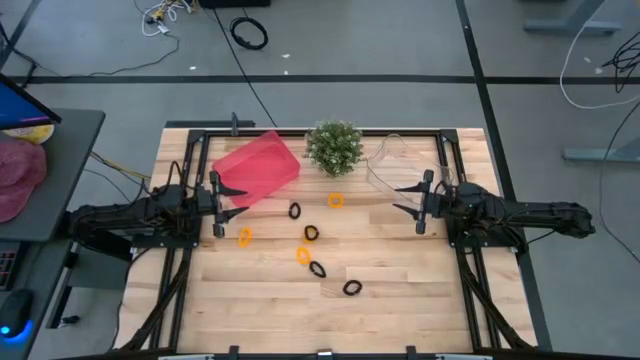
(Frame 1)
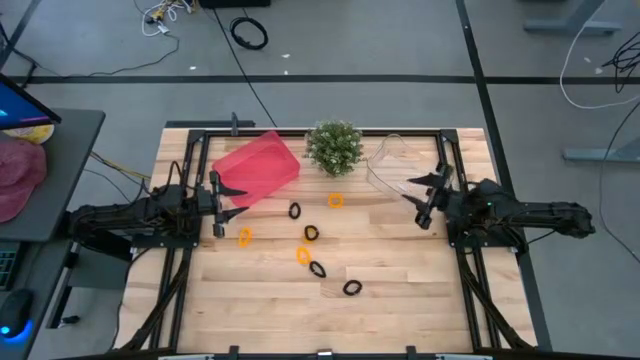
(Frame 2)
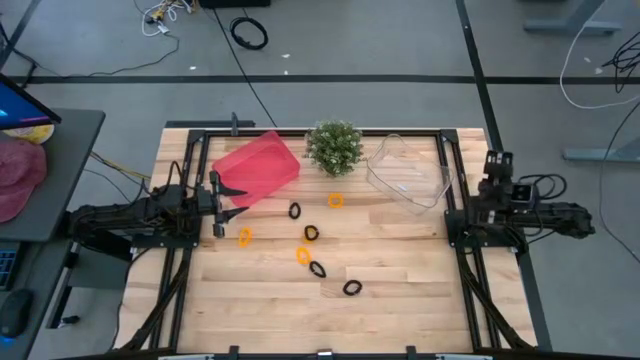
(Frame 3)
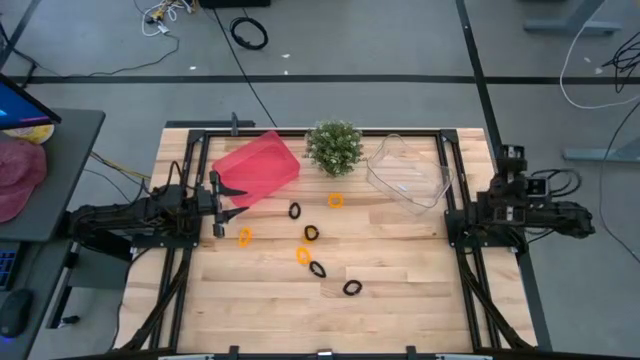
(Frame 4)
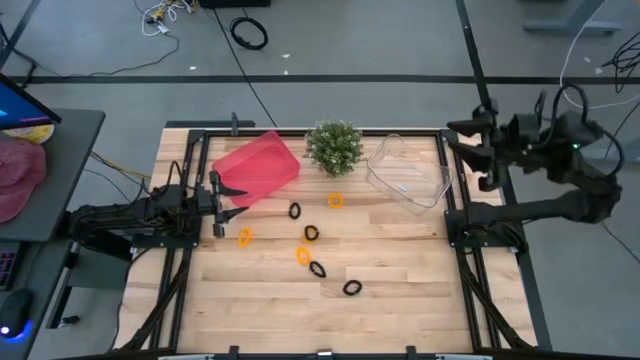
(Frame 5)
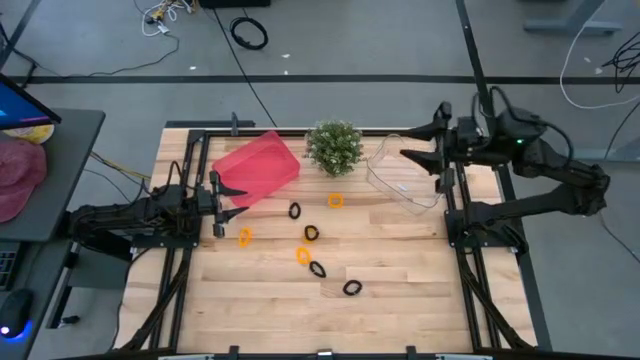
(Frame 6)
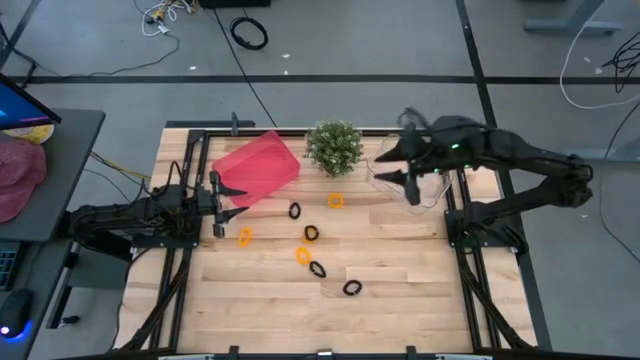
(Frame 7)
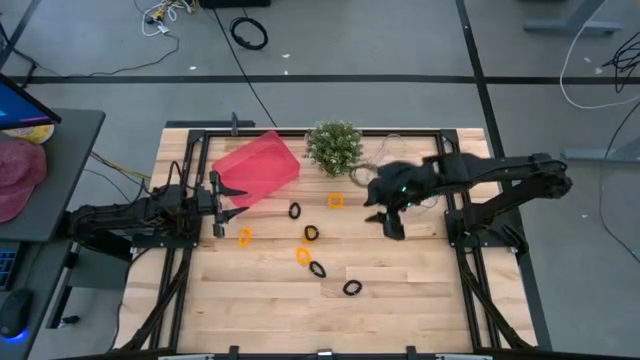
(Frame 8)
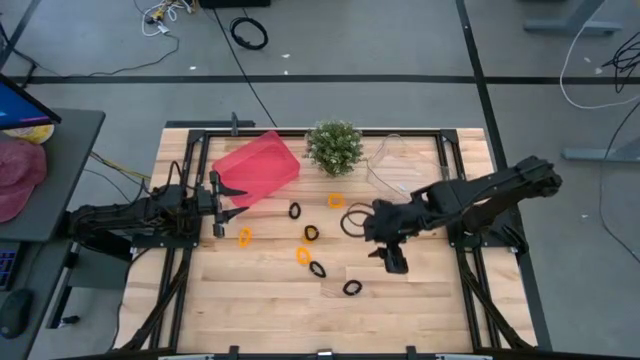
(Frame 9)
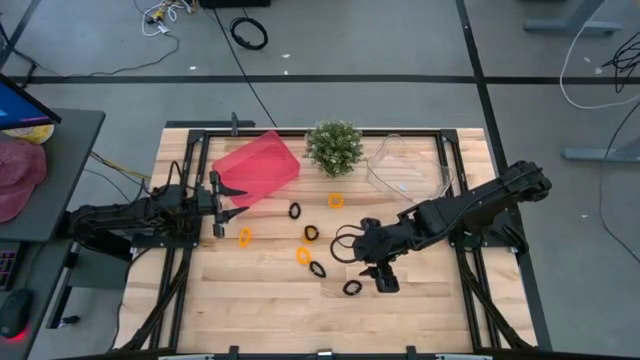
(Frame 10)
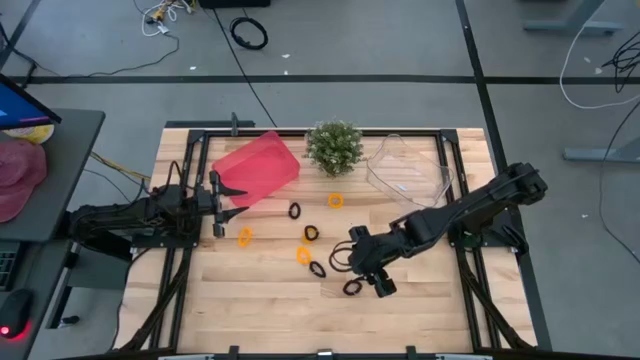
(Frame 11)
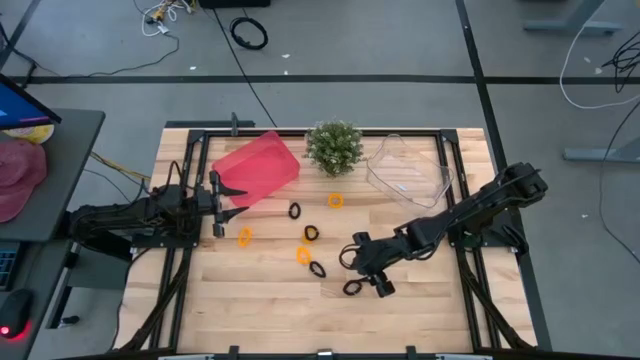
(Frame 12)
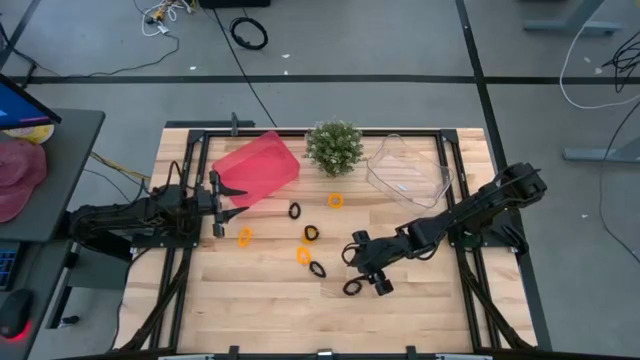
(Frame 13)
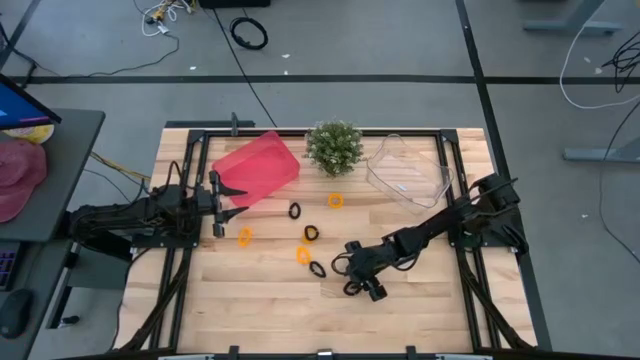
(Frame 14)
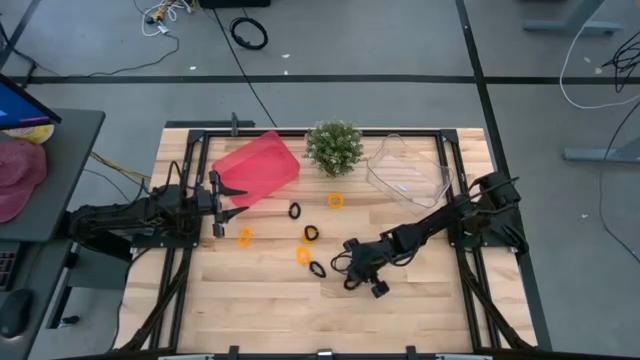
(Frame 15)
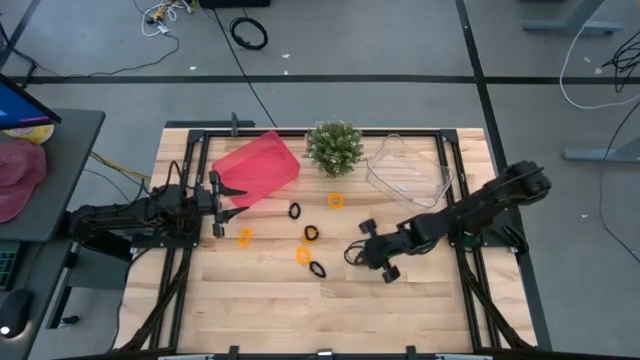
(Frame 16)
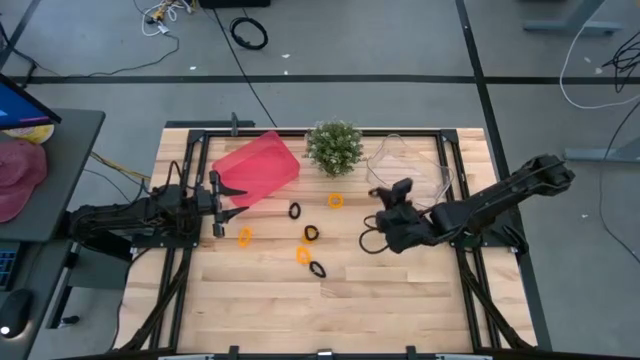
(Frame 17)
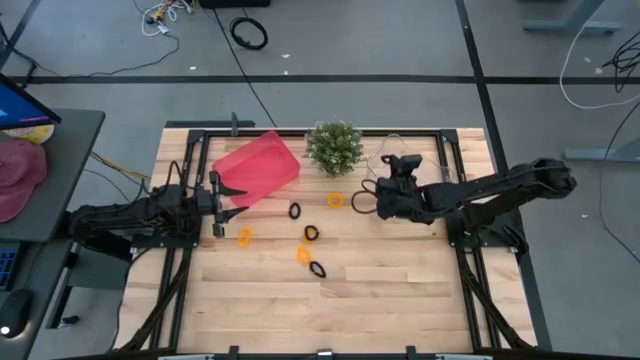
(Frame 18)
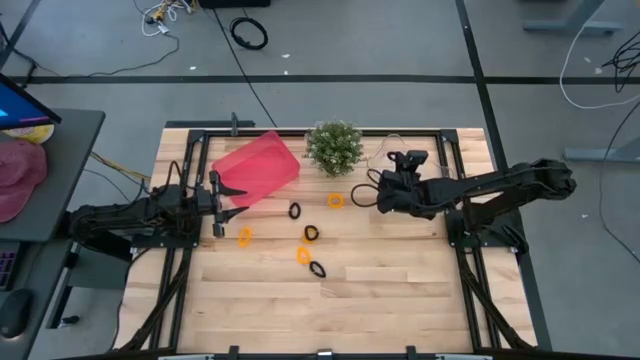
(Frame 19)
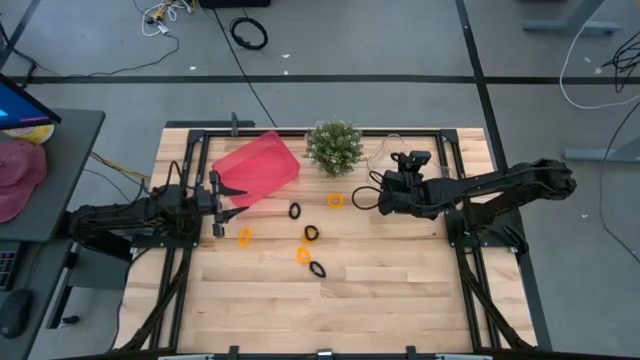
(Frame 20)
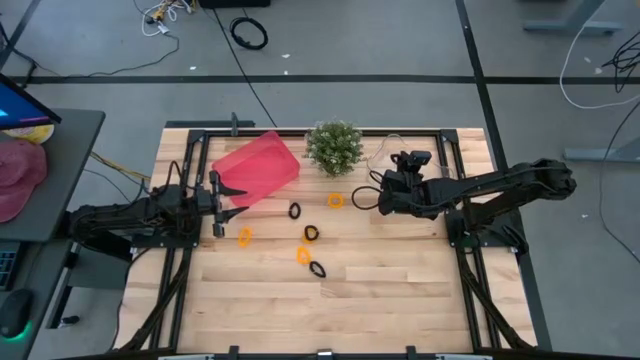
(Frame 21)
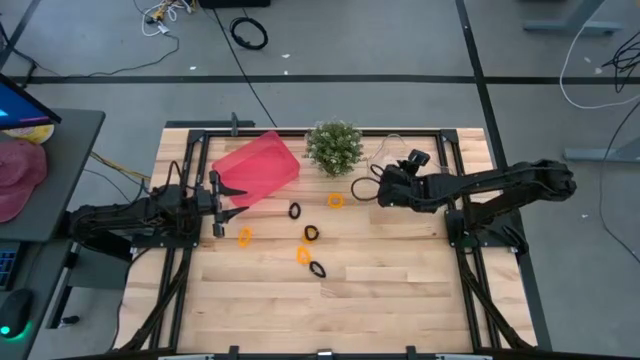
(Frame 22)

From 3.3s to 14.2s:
Task: Sort spring keychains
Put the black spring keychain into the transparent bin

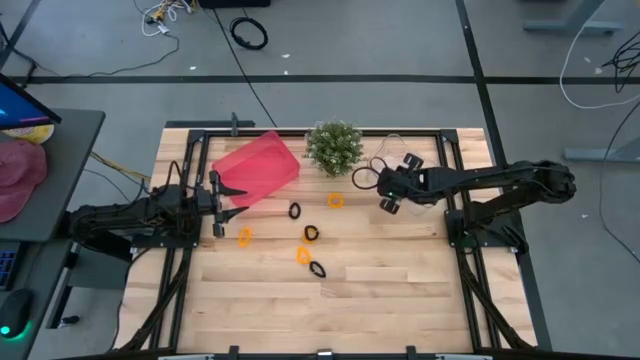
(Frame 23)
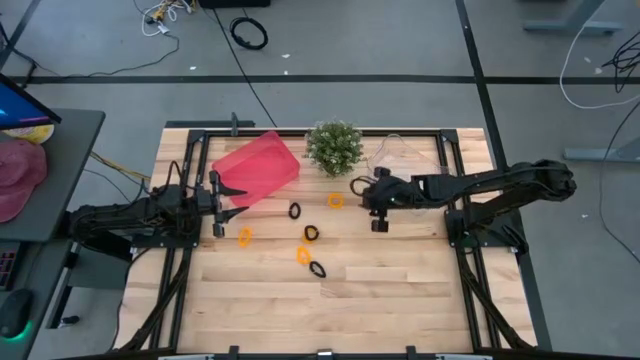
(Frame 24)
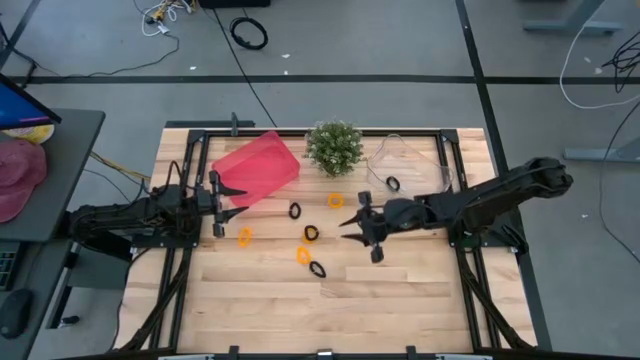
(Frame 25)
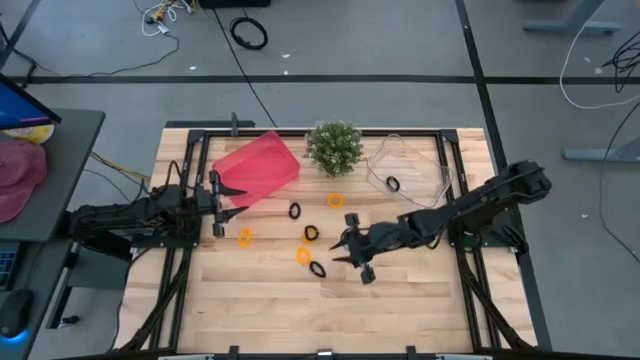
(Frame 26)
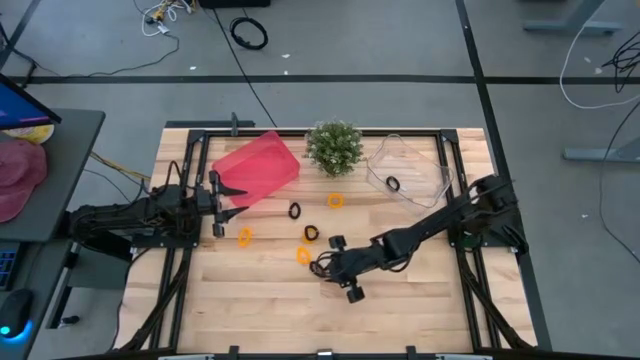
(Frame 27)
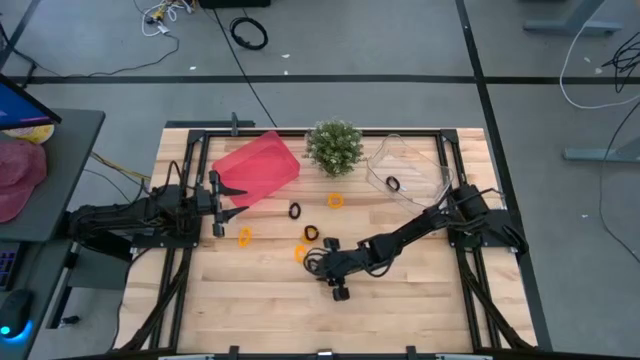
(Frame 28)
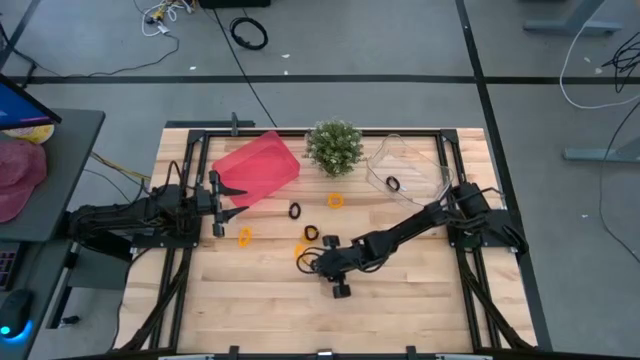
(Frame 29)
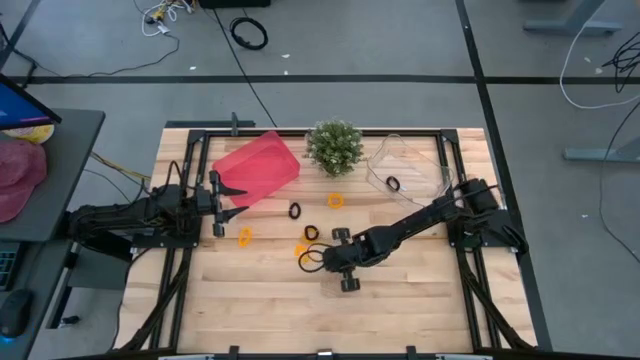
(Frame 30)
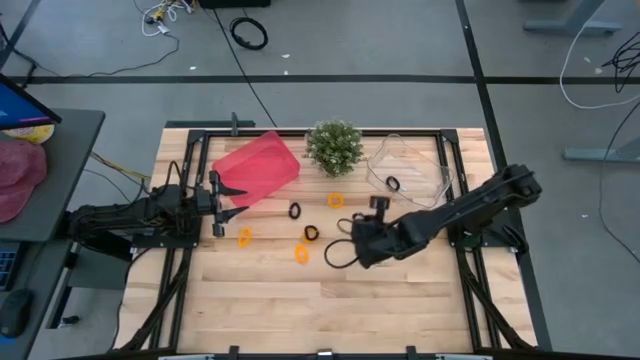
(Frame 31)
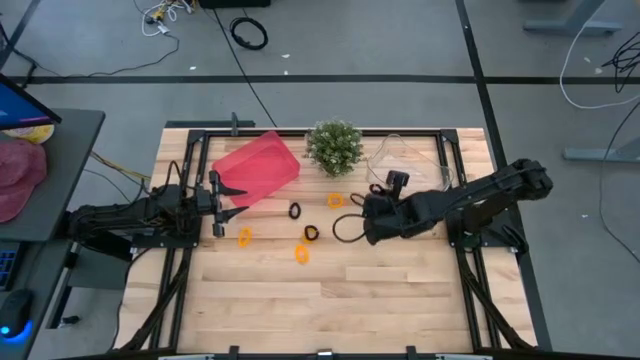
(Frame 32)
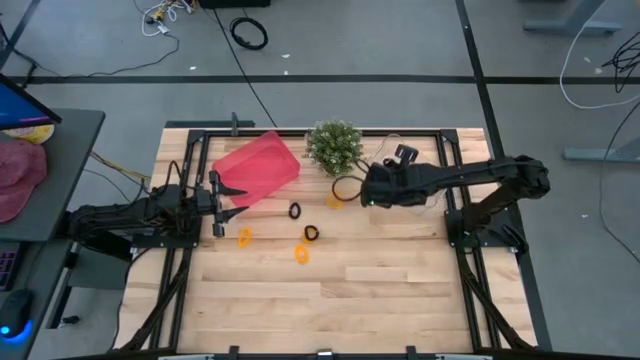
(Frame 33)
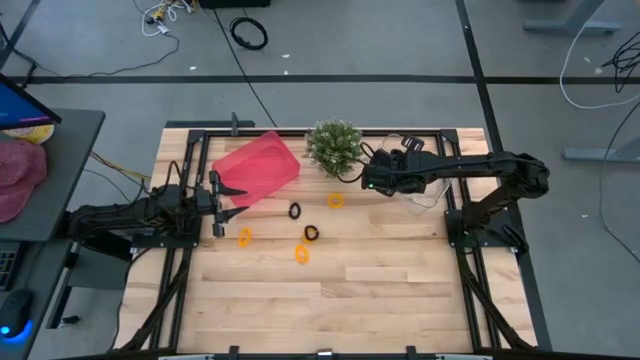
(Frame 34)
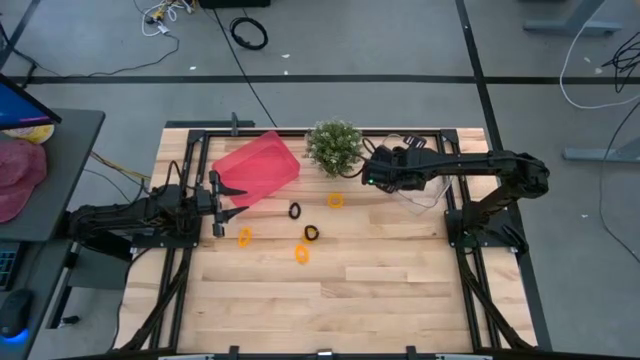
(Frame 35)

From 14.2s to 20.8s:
Put the black spring keychain into the transparent bin

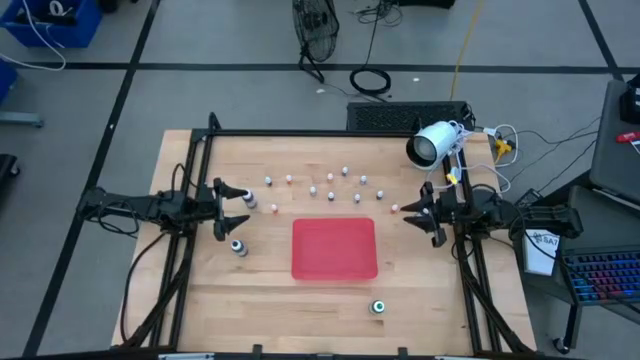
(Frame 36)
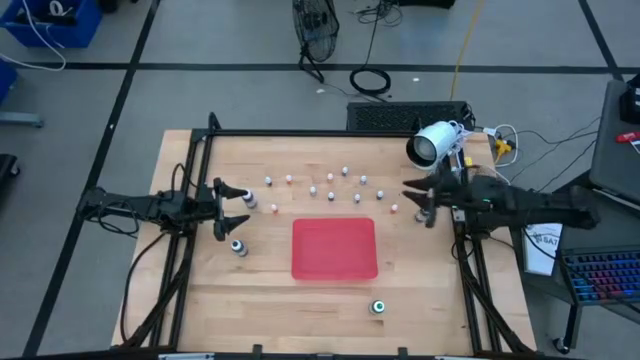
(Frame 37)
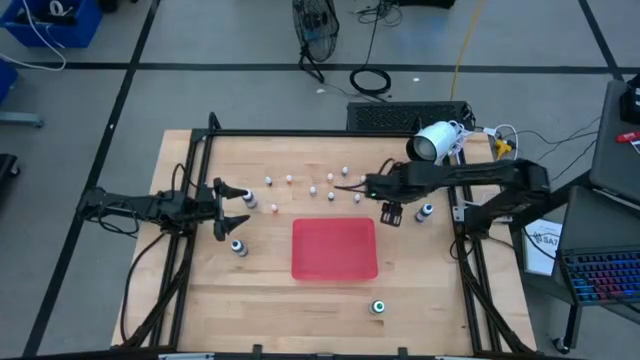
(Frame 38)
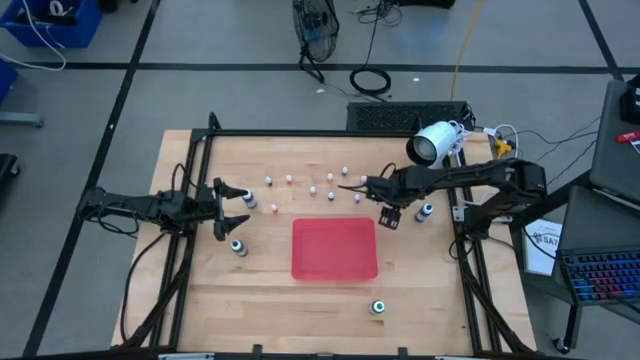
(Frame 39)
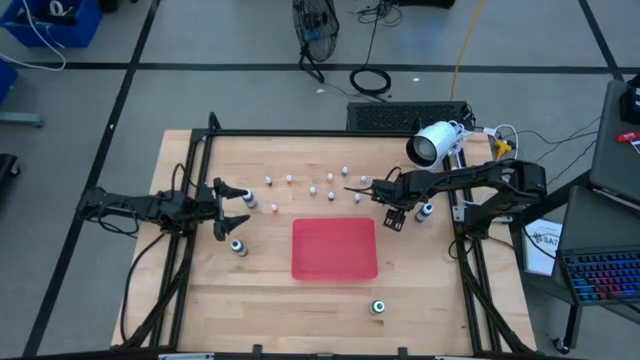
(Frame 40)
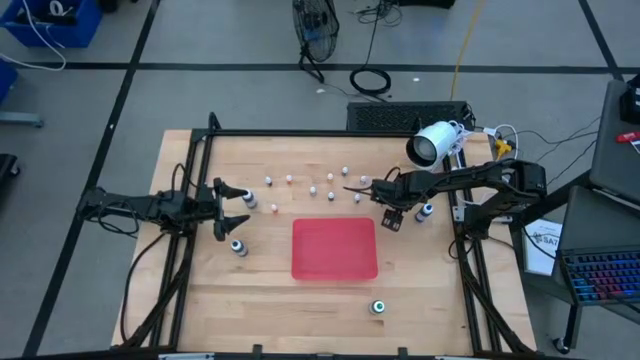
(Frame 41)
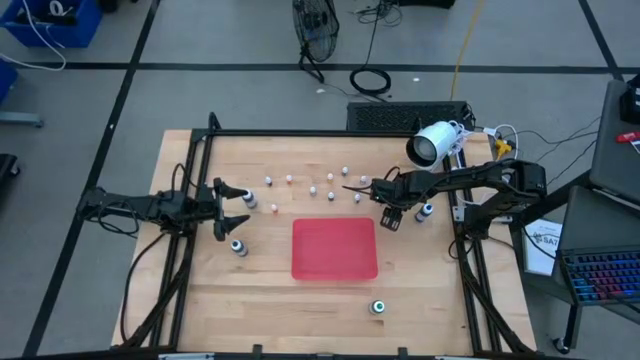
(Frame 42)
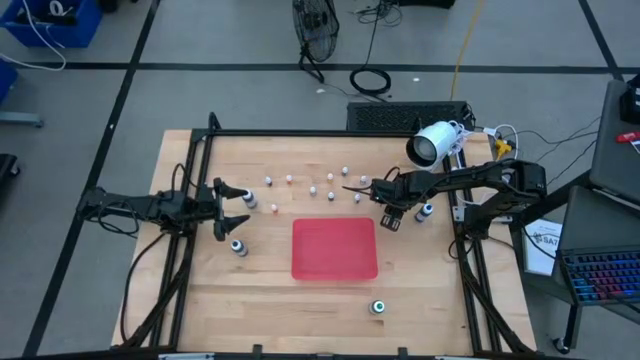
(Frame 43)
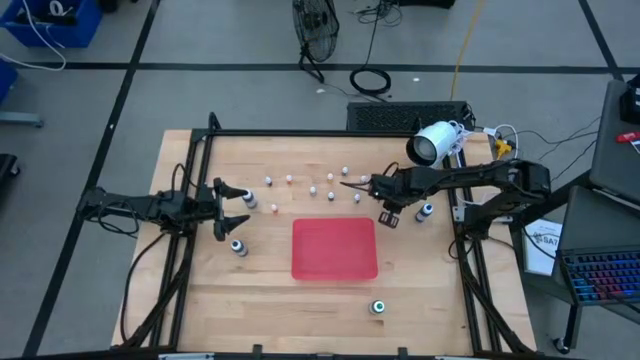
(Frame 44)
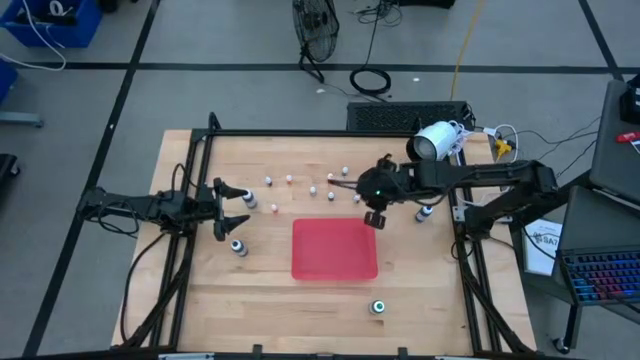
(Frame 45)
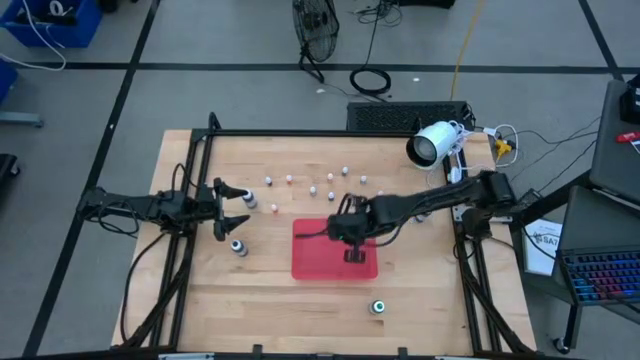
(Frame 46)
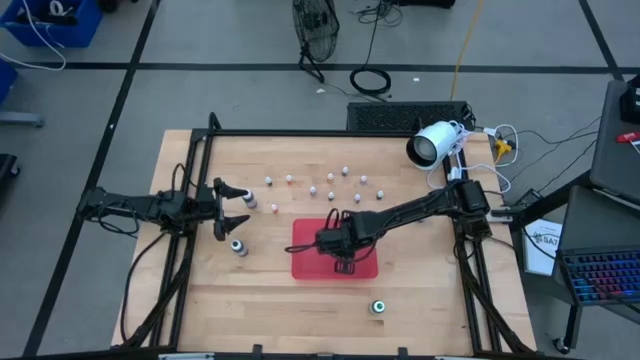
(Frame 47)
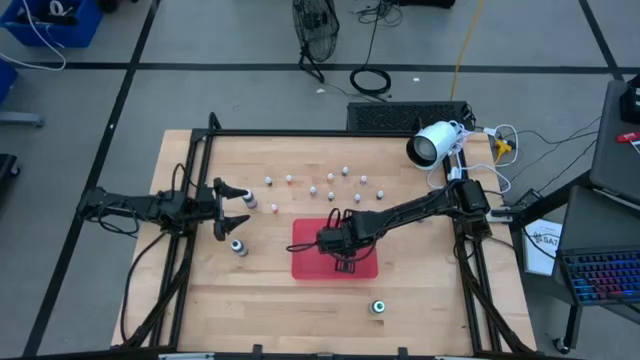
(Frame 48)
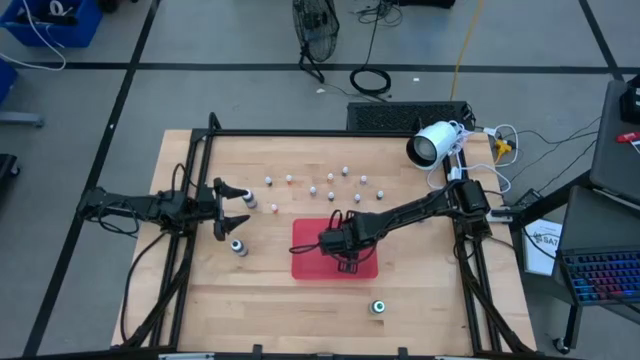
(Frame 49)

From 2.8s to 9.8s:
Task: Pick & Place food coloring
Put the small orange food coloring bottle into the pink bin
